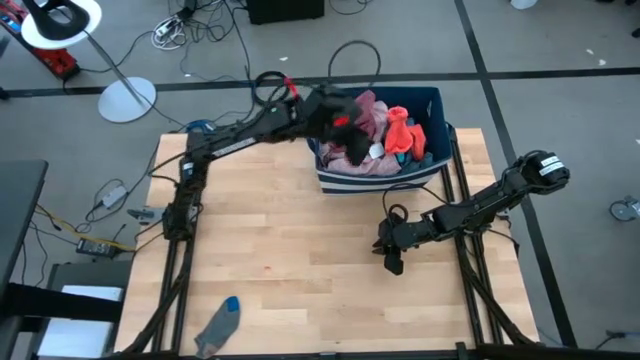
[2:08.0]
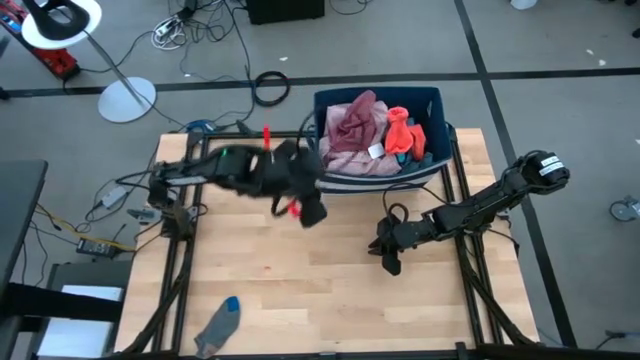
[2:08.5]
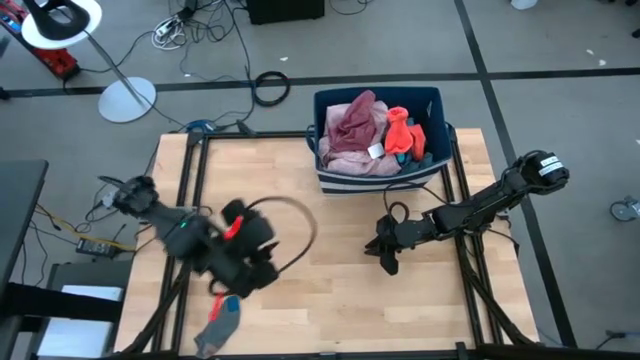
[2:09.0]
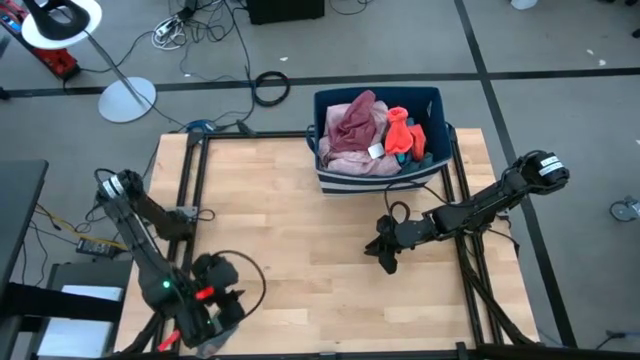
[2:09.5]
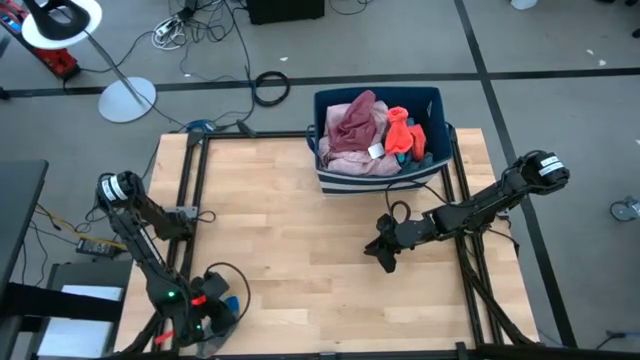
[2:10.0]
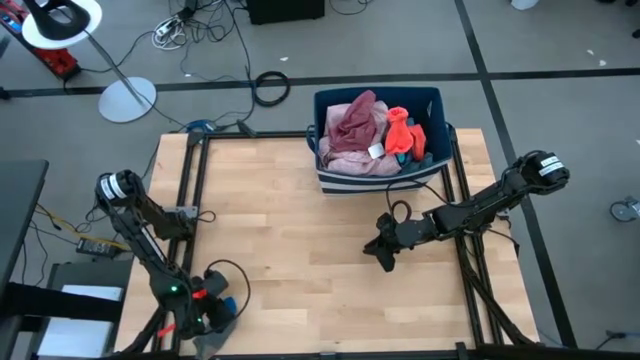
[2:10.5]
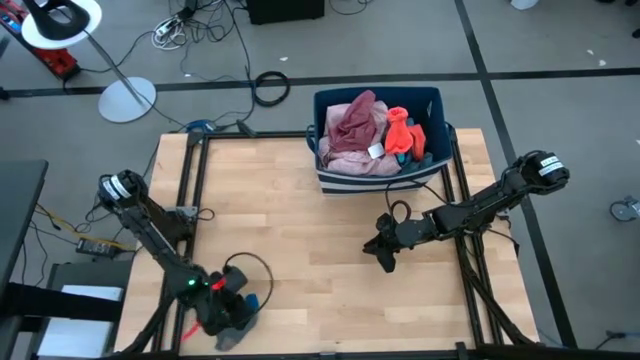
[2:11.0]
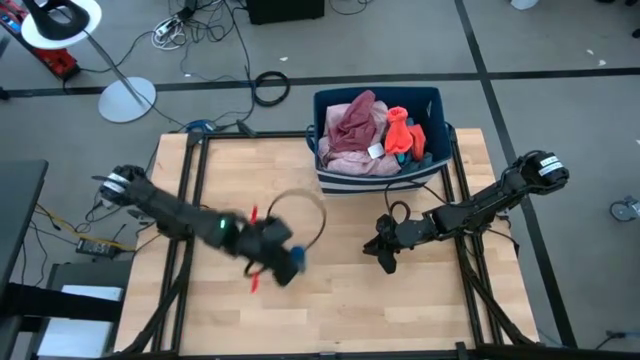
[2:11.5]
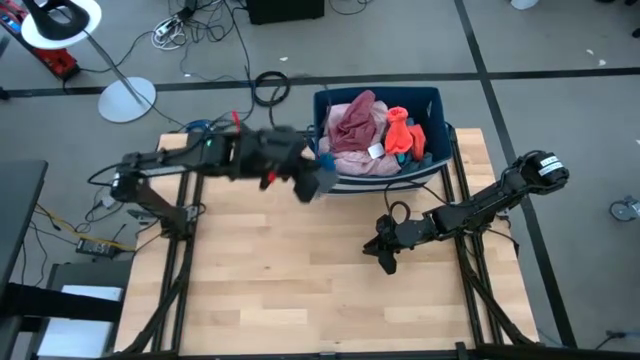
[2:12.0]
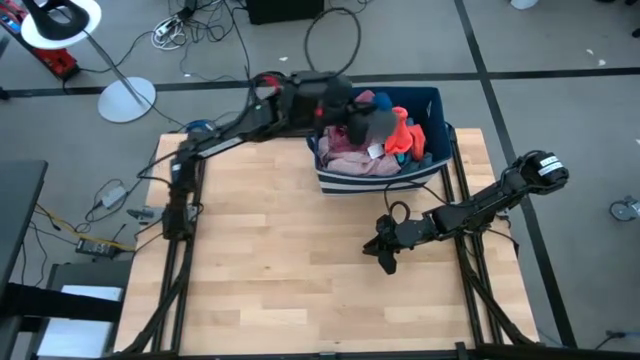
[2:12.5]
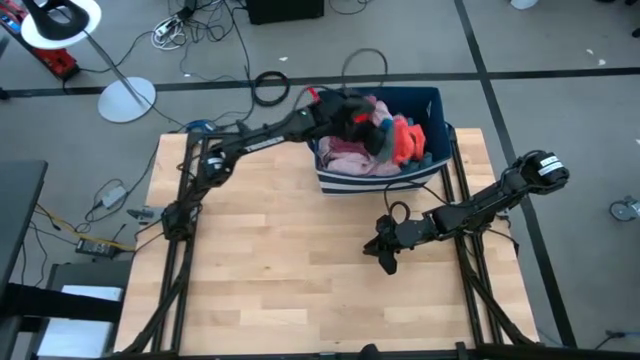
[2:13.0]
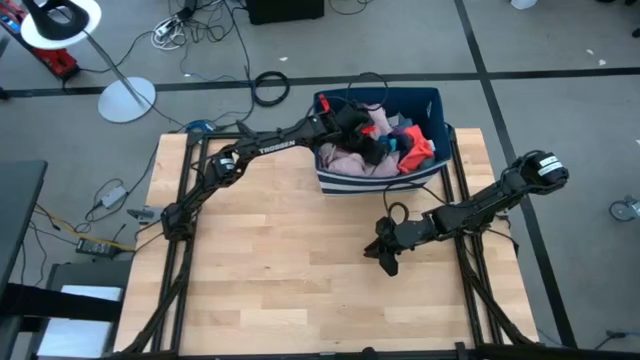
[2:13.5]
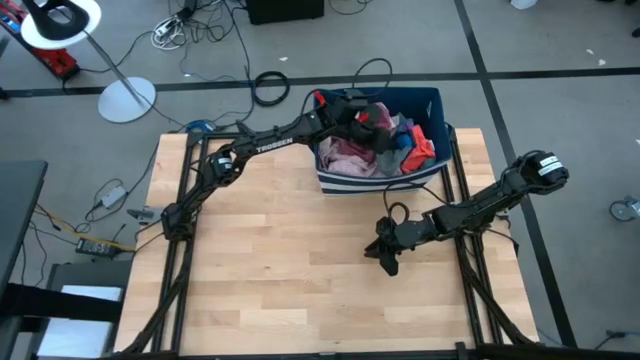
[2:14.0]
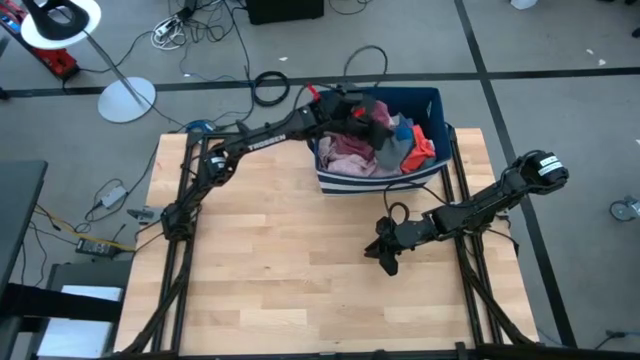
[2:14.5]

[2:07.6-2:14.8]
Task: Sort clothes
Put the gray socks into the blue bin

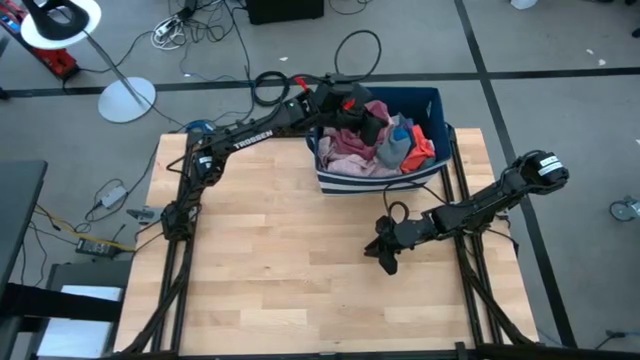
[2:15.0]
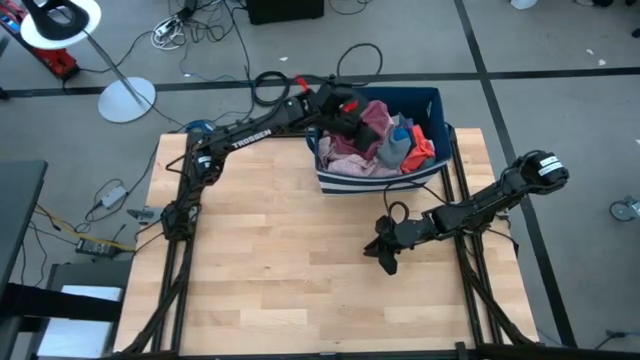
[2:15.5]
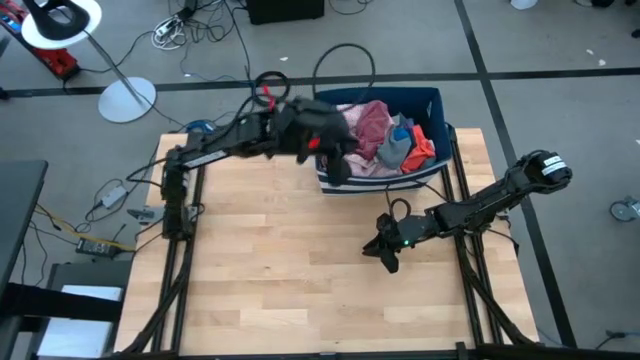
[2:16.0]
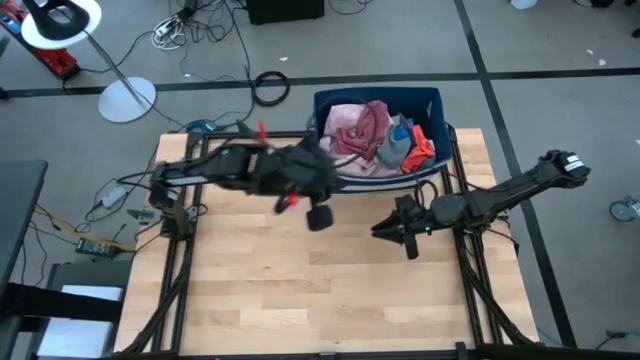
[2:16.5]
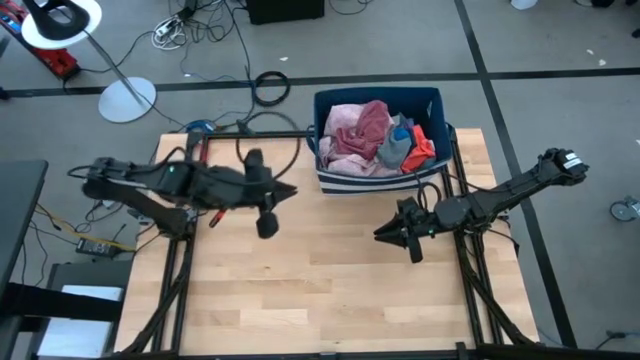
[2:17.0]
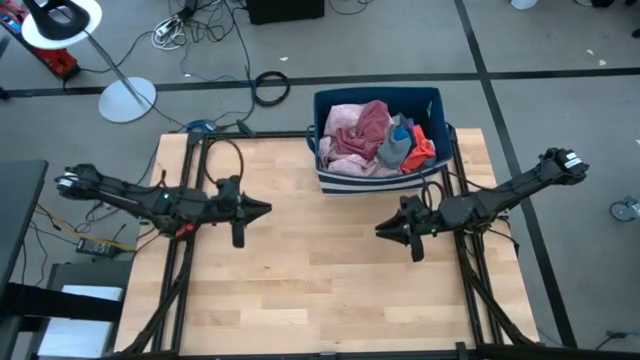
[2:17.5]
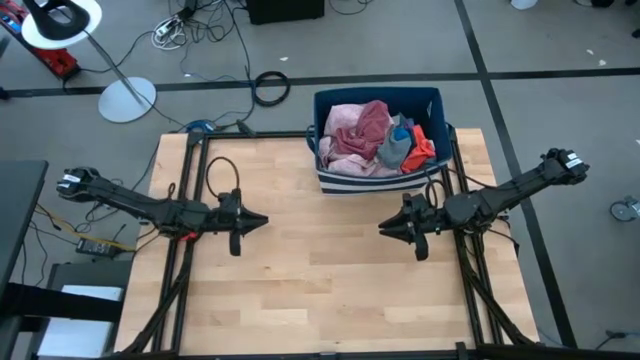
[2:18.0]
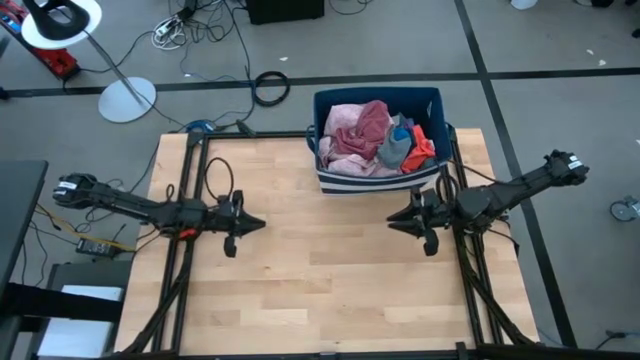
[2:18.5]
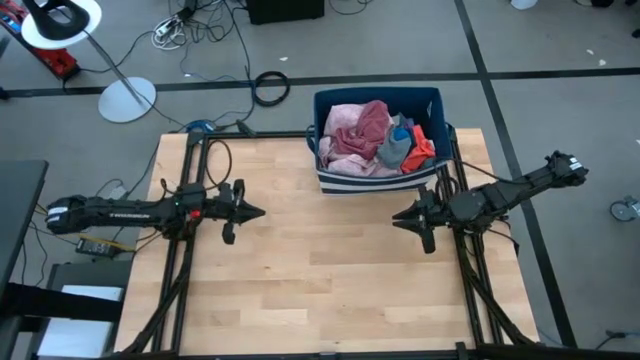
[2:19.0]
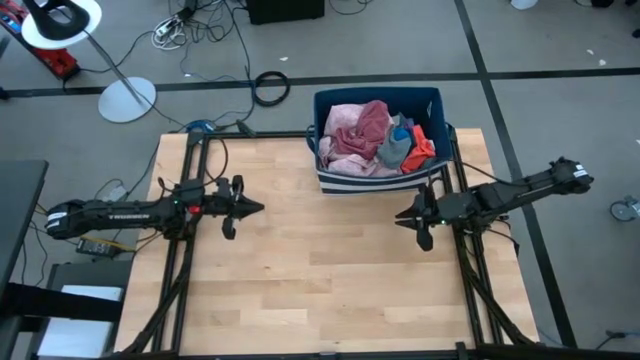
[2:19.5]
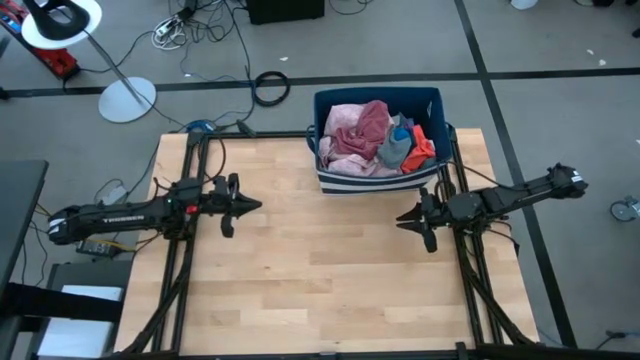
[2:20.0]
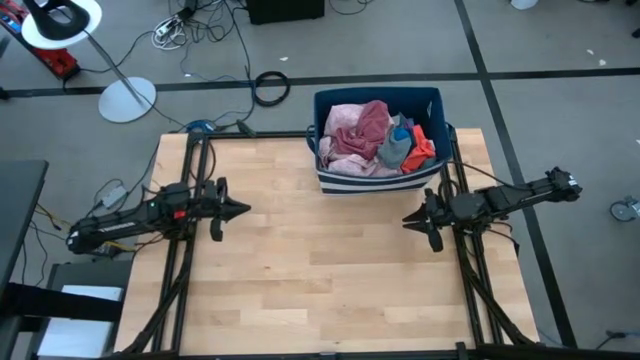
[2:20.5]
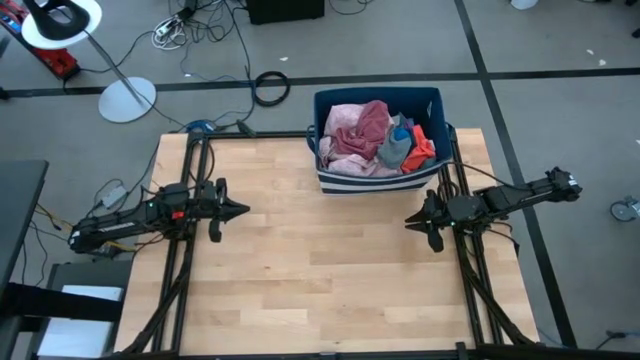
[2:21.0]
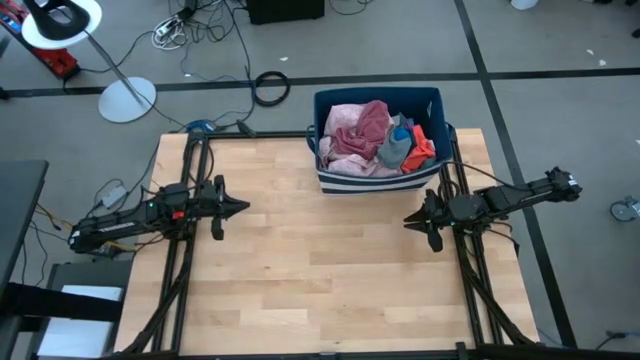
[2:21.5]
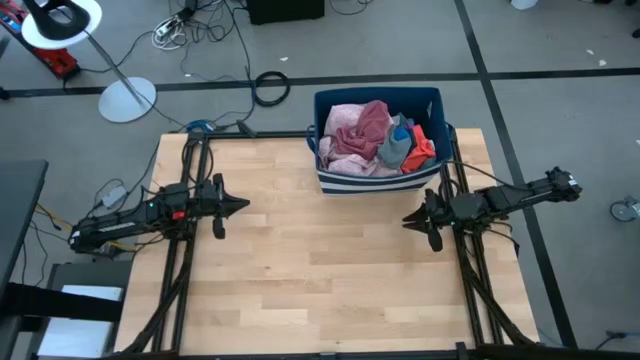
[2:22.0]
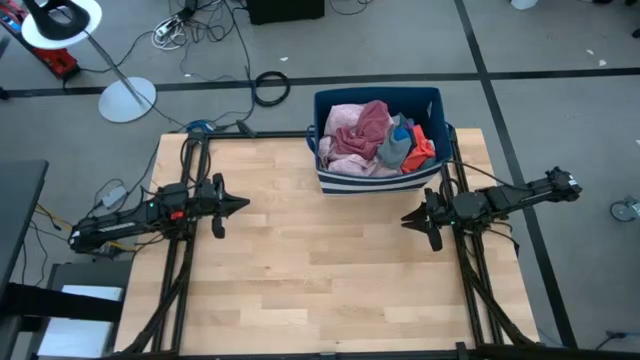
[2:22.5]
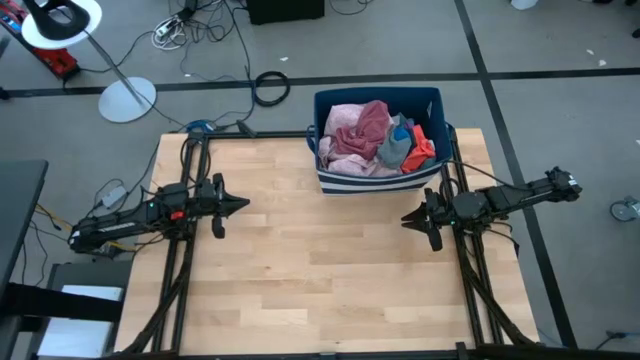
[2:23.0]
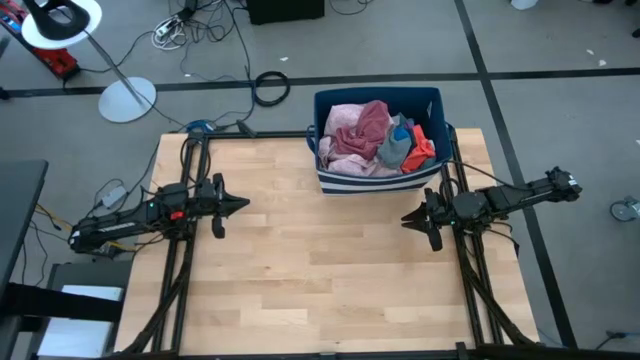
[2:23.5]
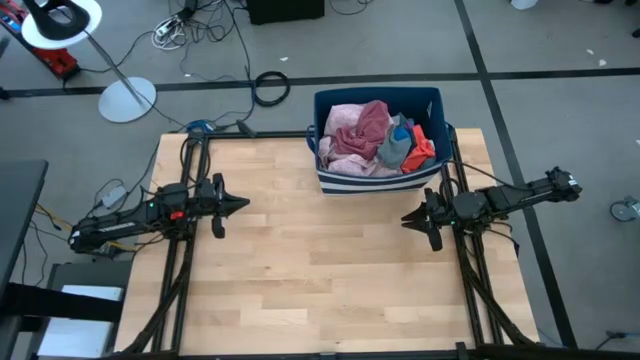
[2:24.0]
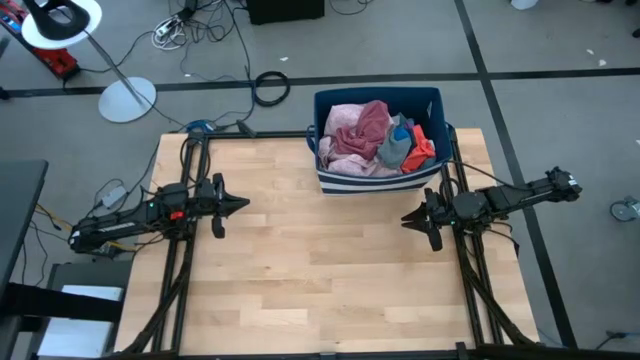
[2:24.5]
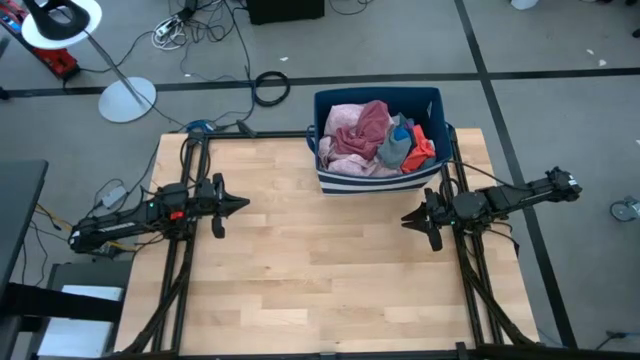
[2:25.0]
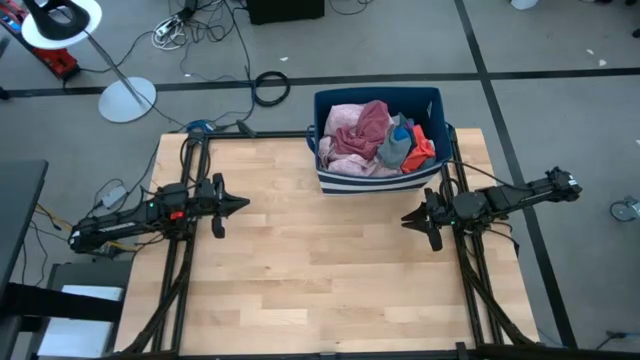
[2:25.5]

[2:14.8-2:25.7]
Return to Home Position

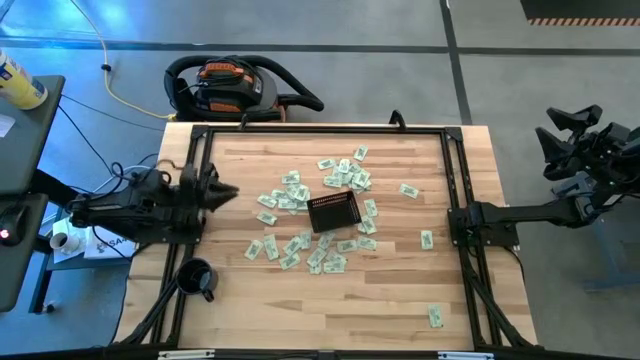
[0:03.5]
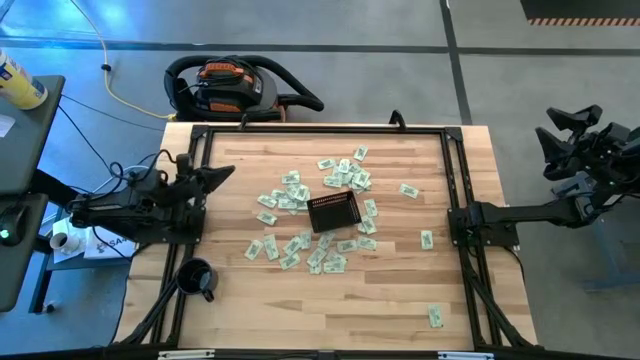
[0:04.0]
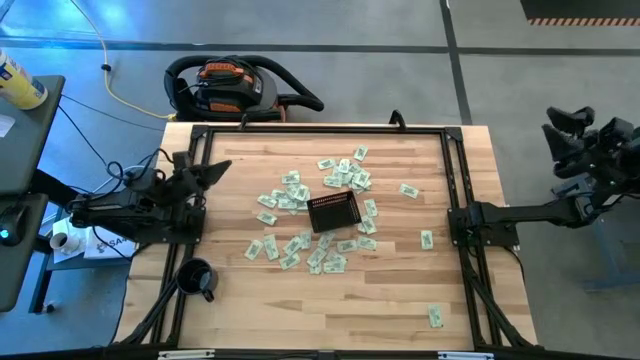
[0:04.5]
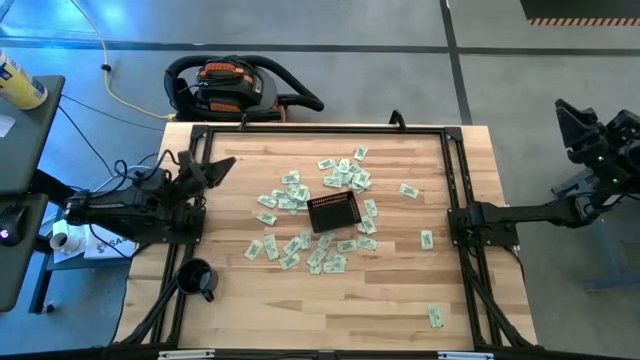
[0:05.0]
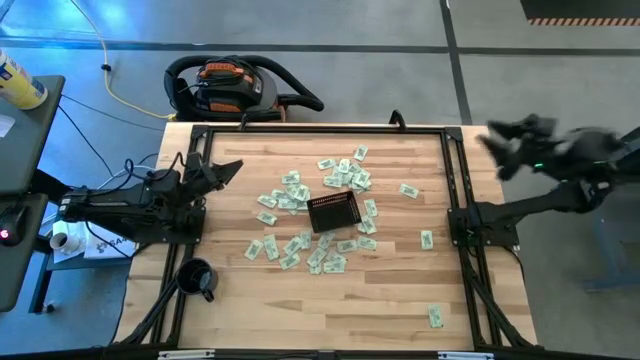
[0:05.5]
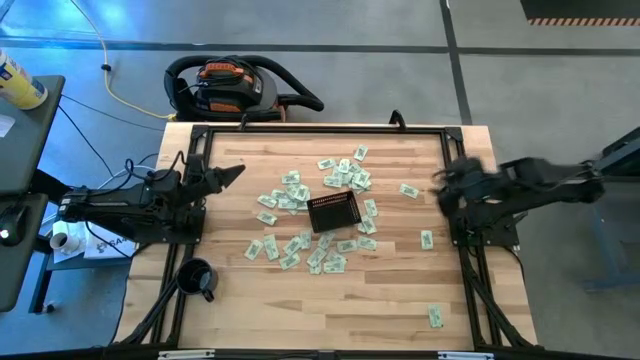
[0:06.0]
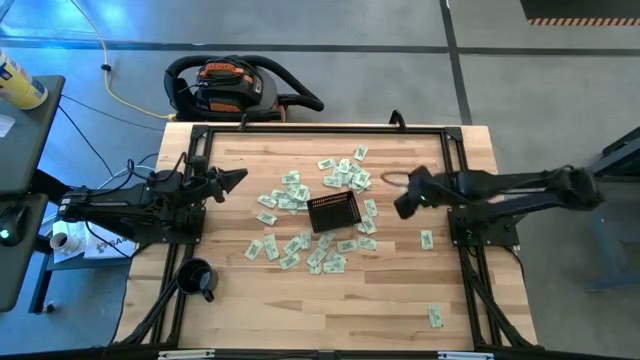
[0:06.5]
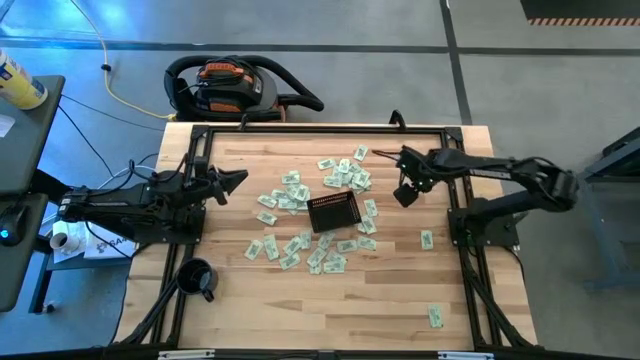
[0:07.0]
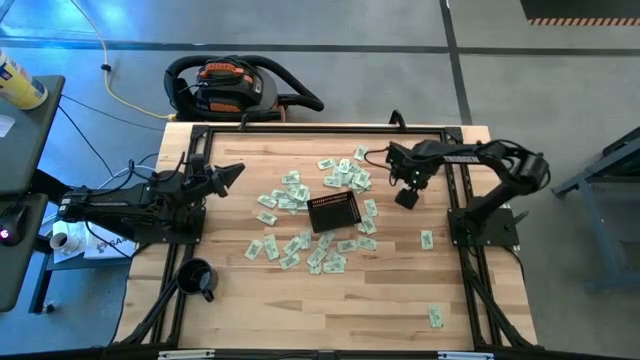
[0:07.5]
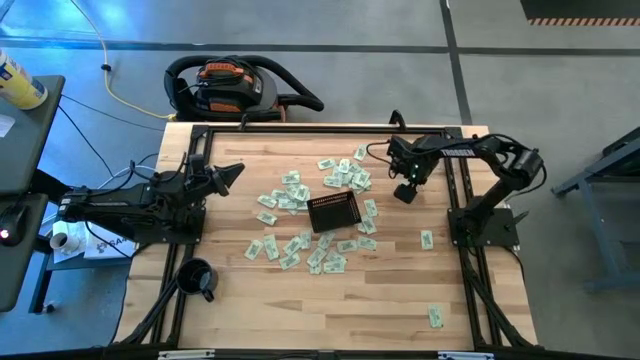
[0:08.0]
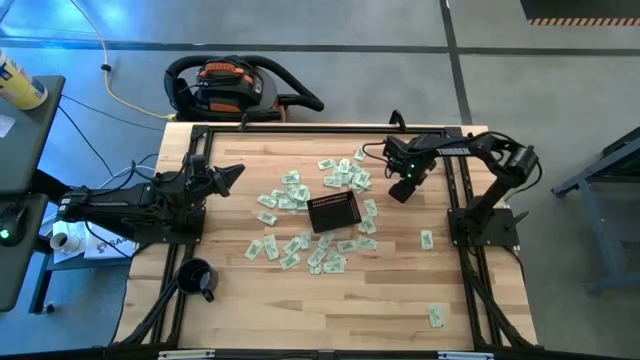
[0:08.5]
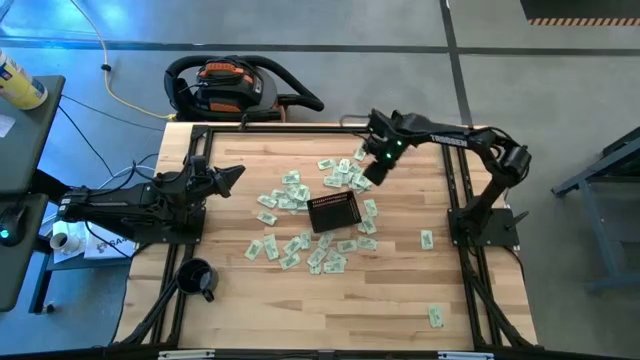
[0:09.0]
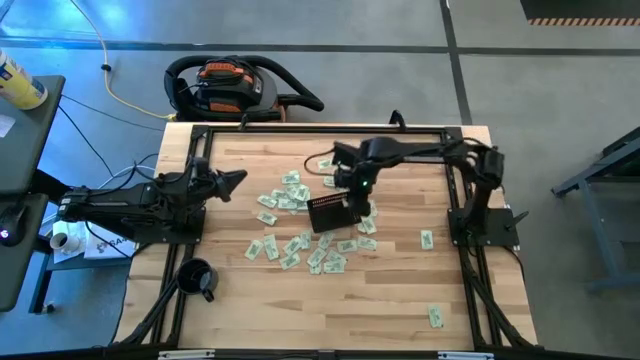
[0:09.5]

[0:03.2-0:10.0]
Task: Pick and place Stevia / Truvia into bins
Put the green stevia packet into the black bin
